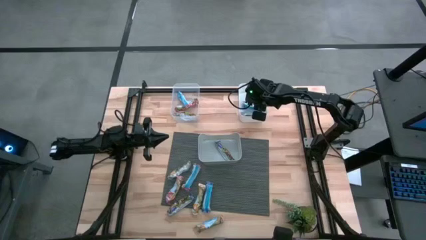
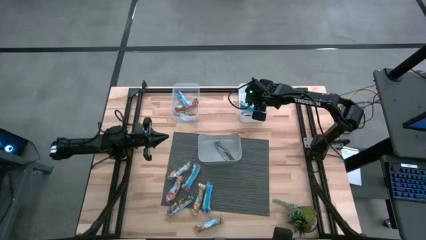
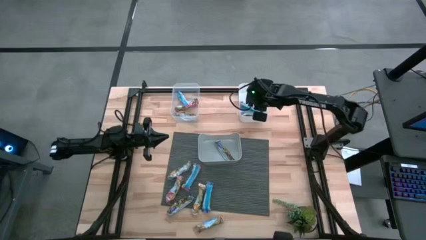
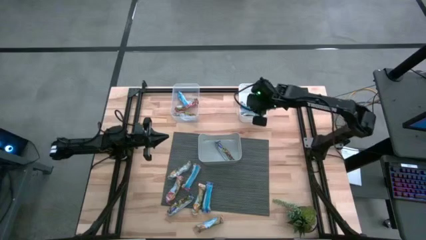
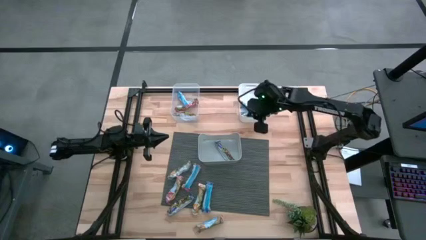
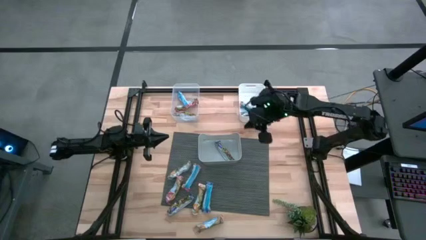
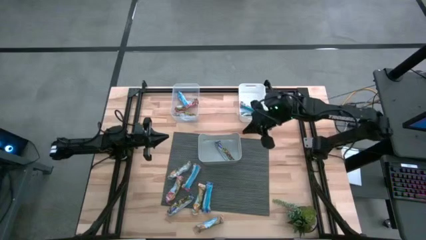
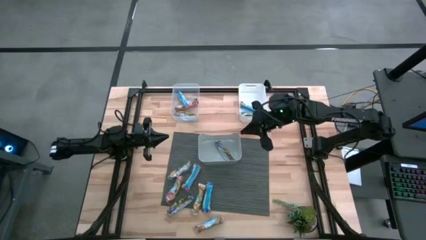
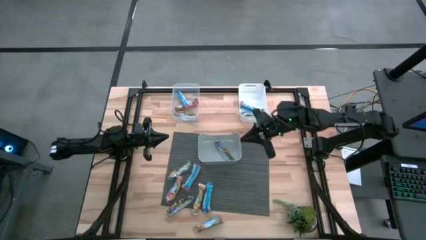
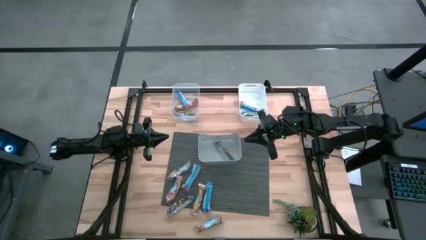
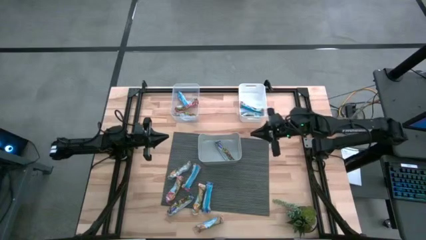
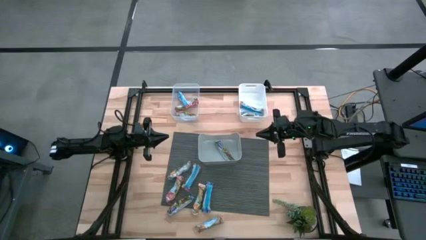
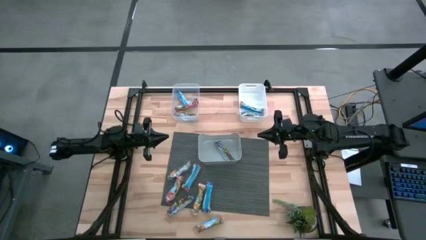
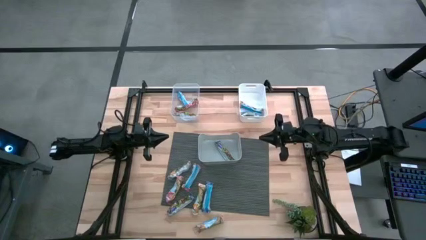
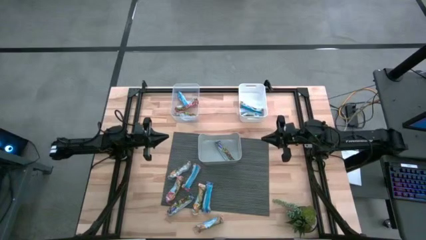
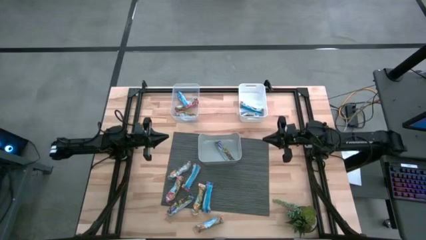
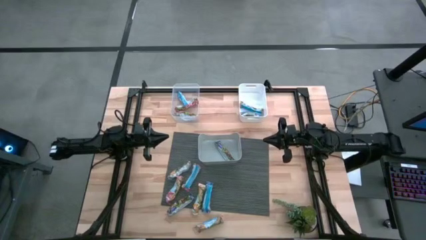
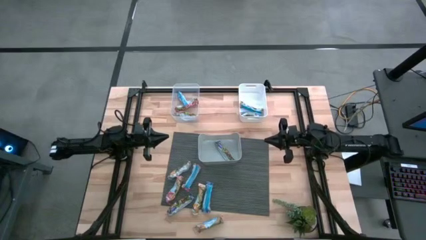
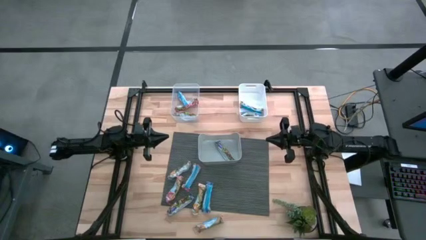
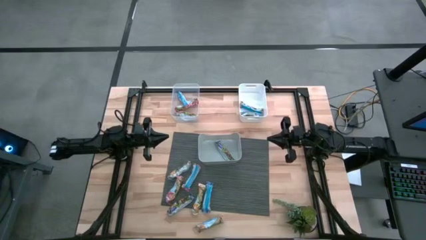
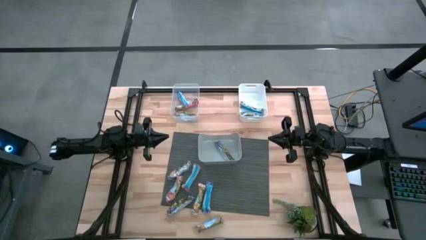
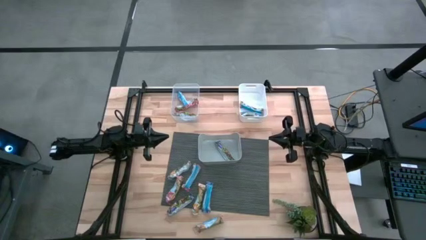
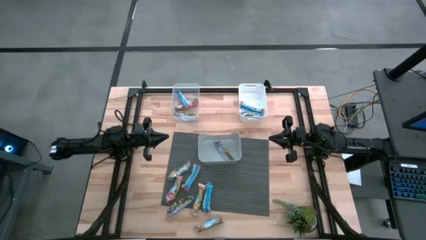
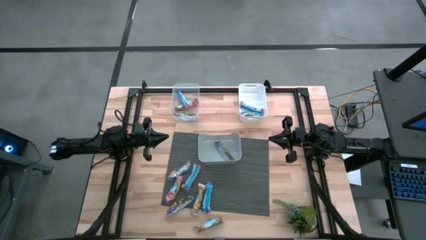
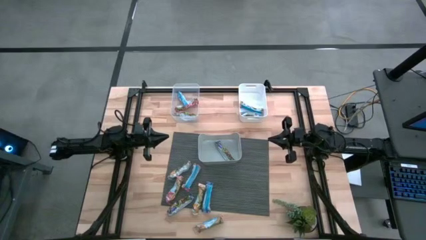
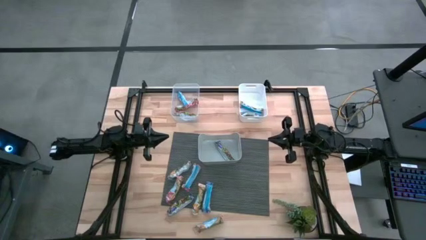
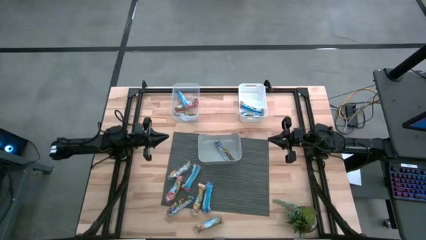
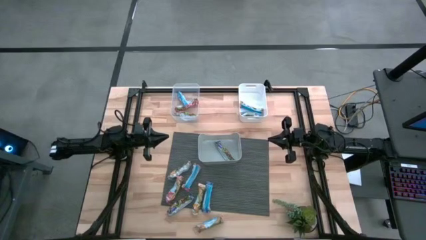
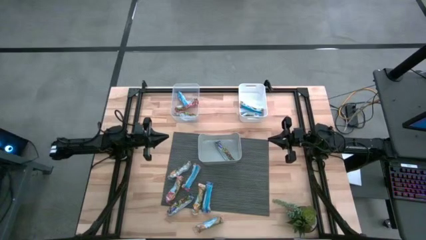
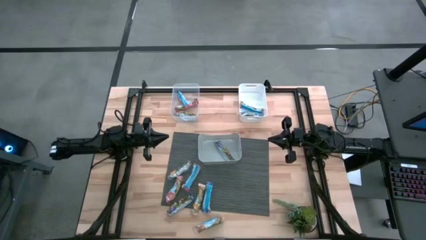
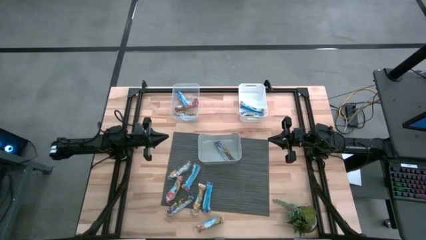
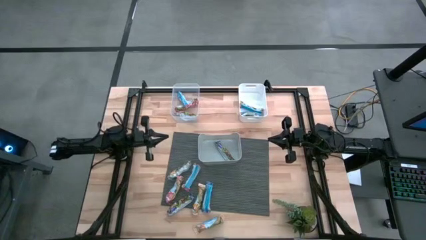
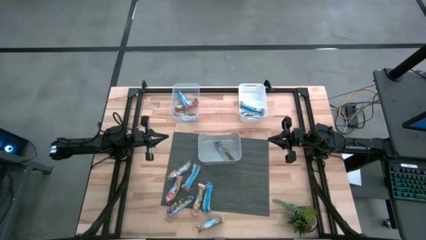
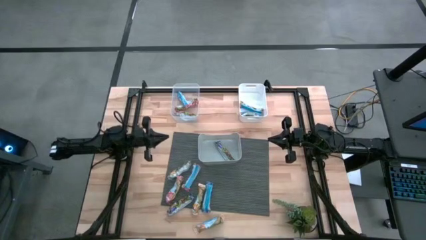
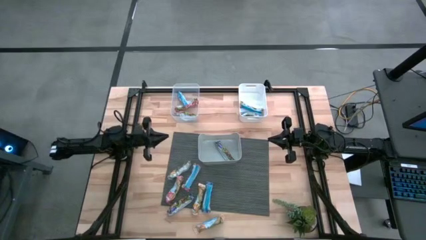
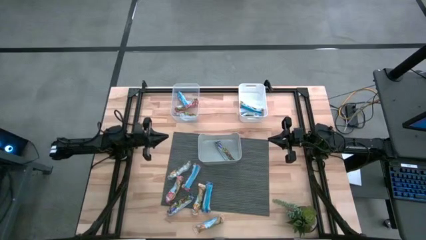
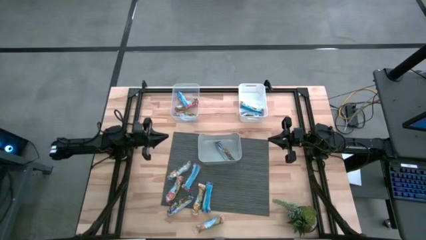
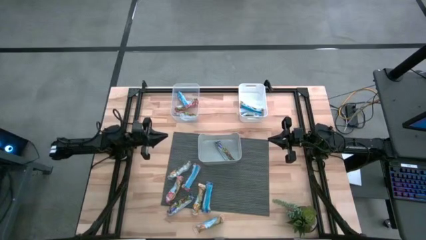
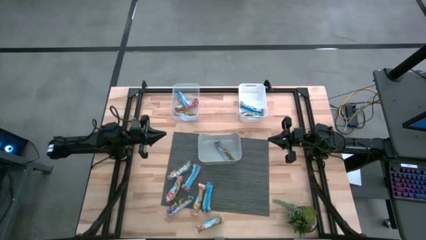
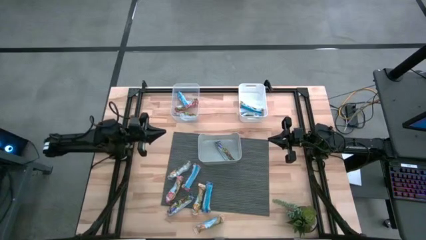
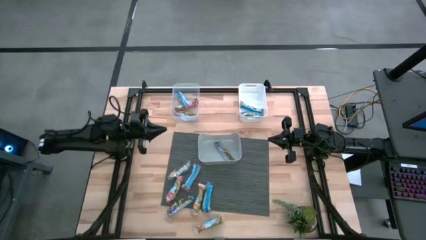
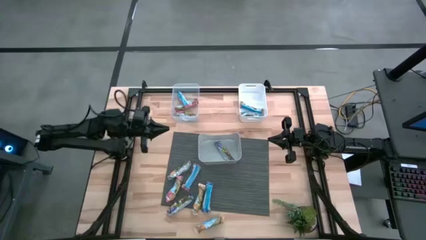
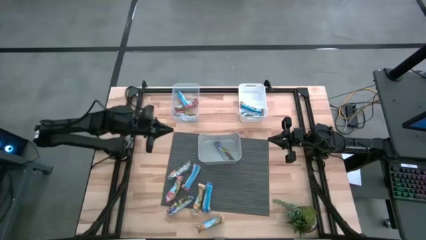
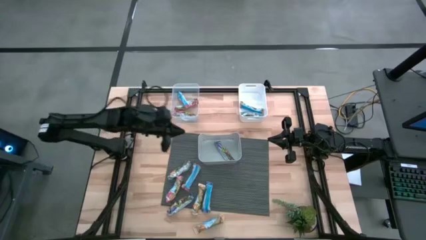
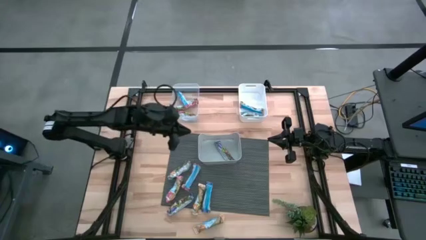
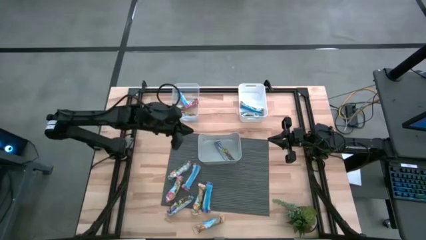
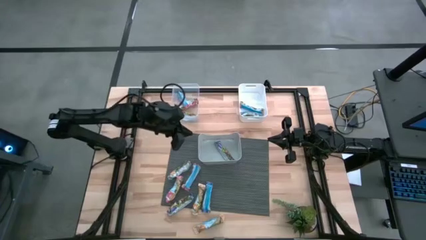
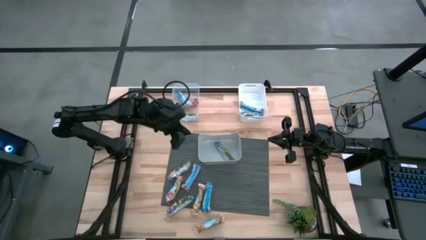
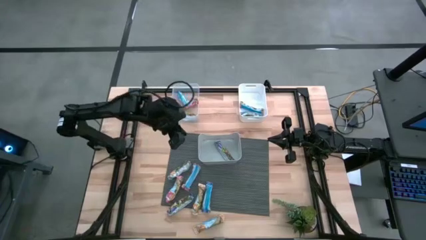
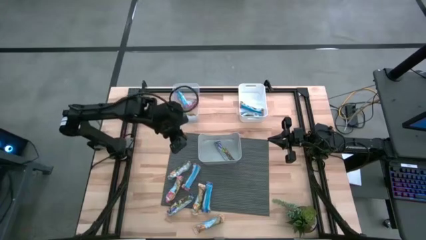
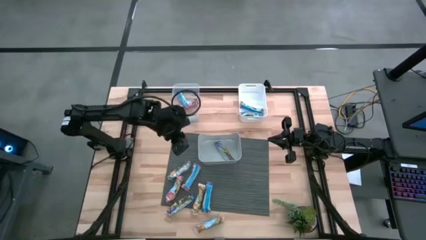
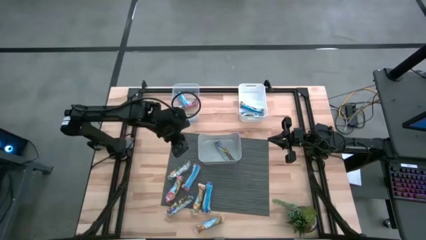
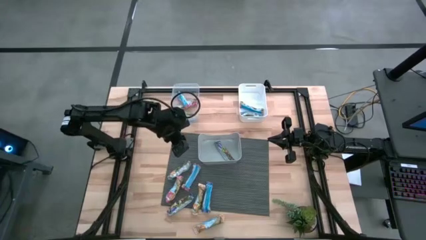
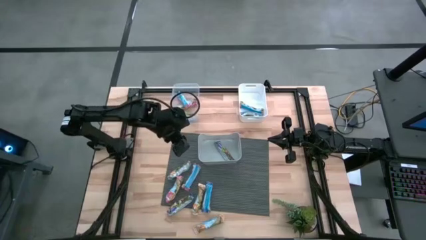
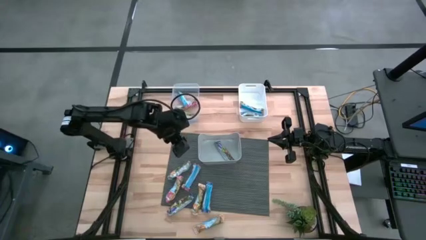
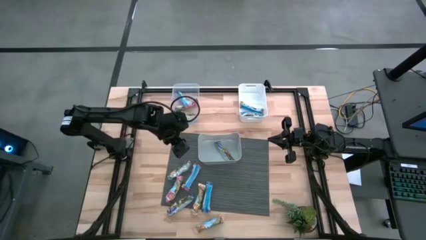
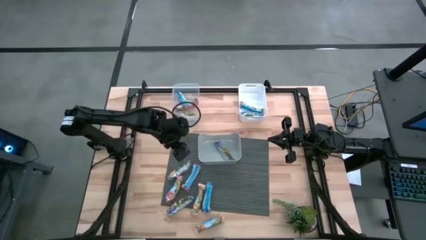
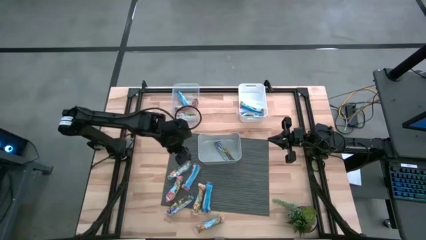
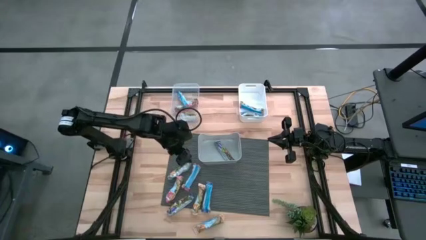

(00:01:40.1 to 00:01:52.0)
Task: Pick and place Granola Bars by type
Put the yellow granola bar into the white bin

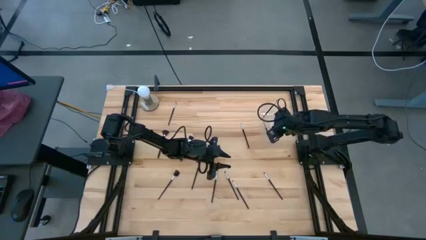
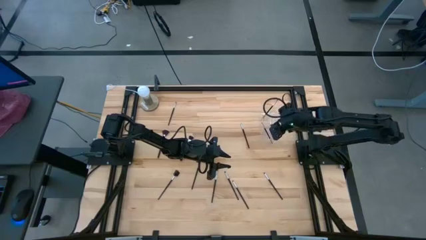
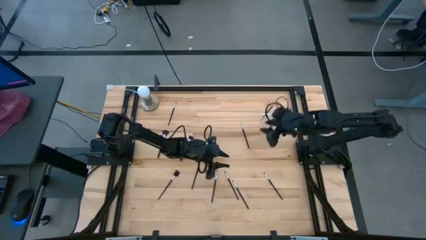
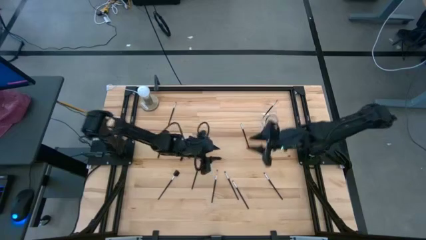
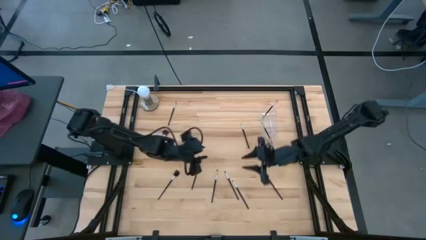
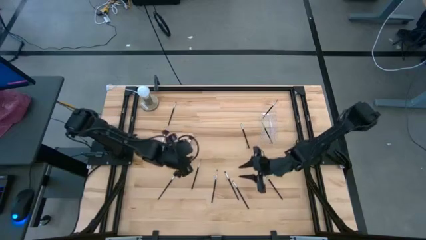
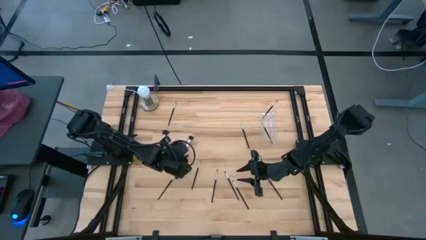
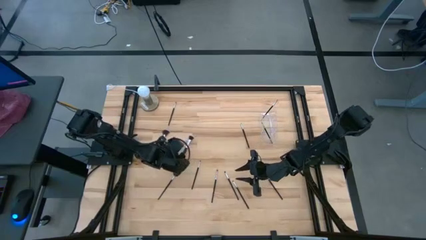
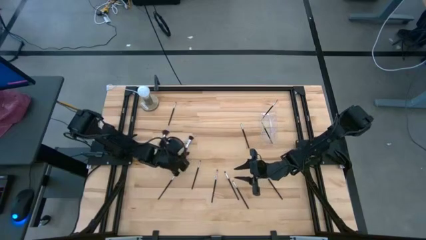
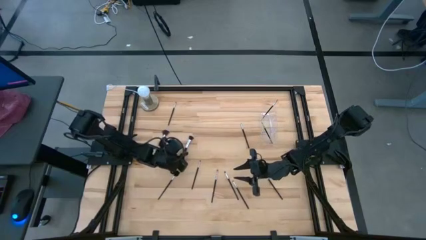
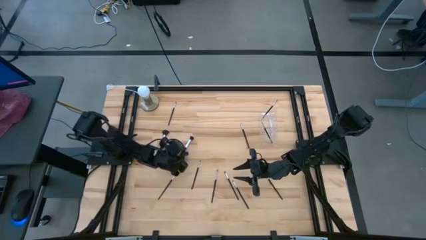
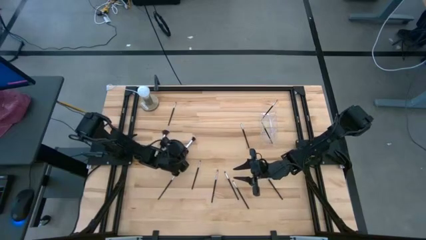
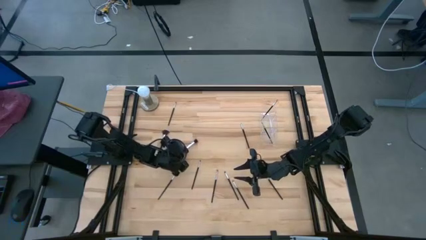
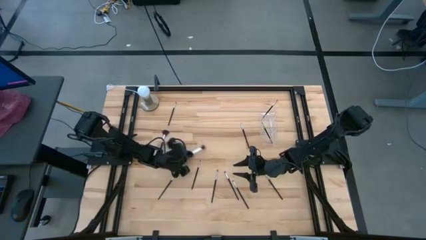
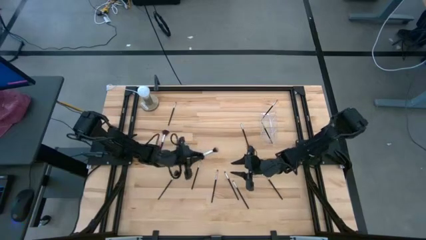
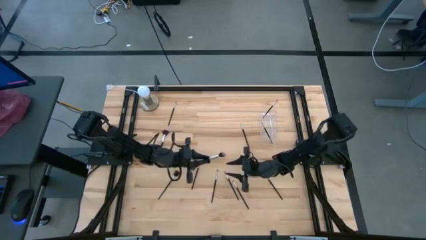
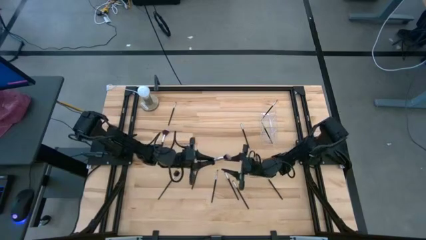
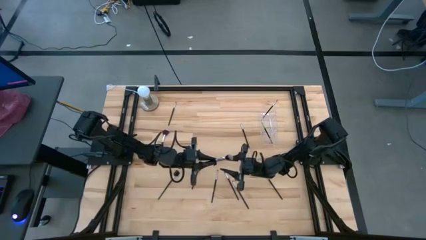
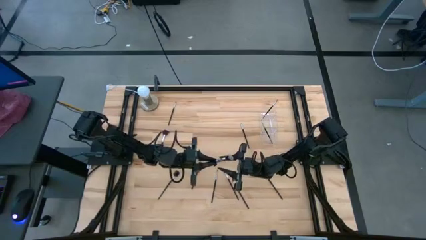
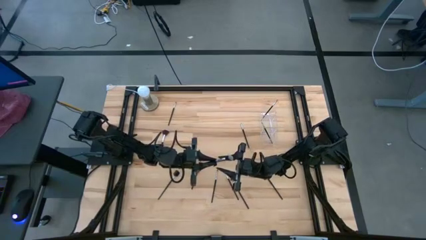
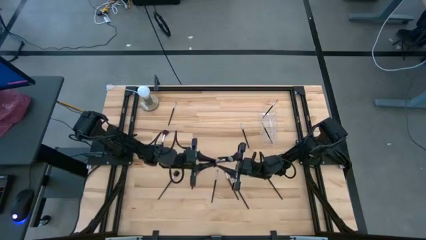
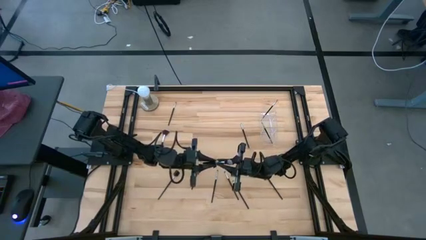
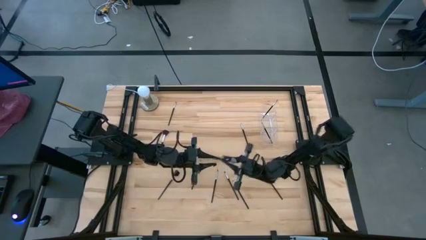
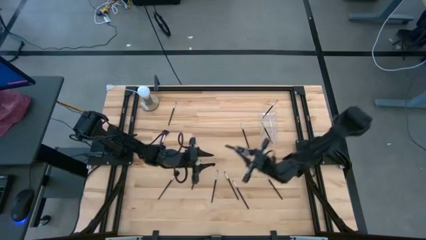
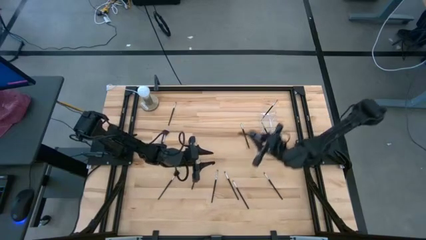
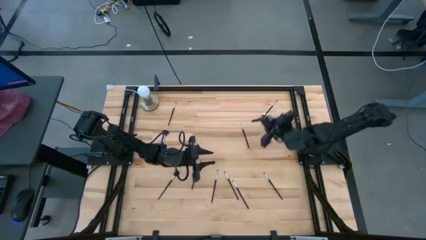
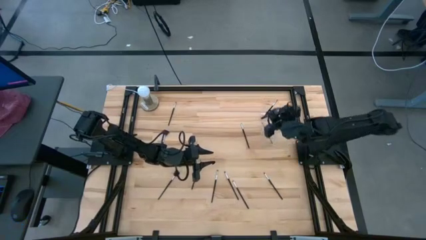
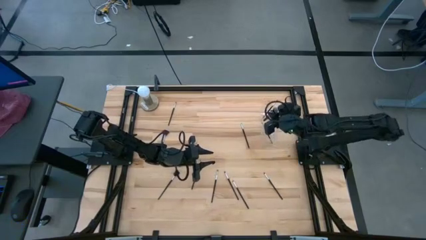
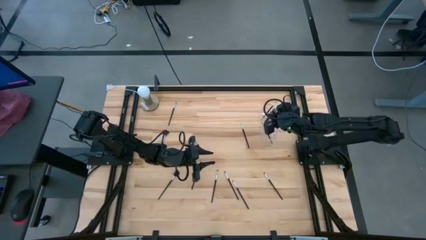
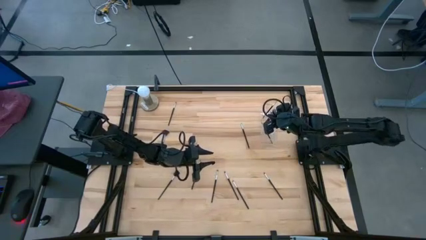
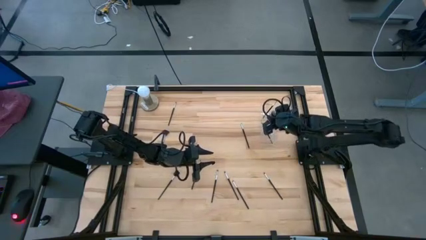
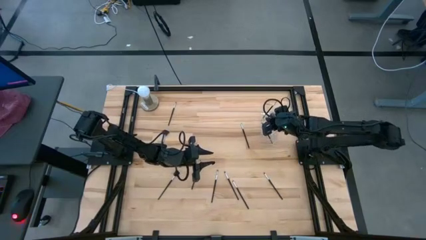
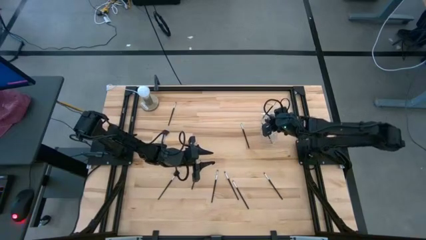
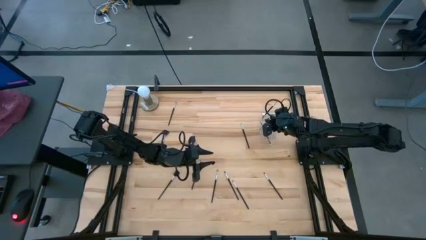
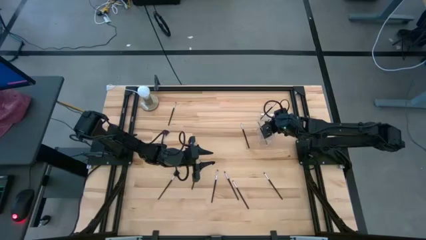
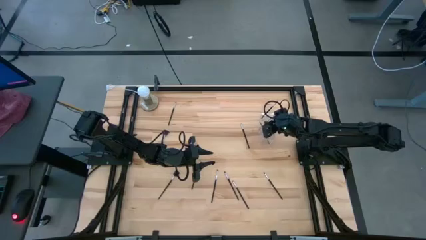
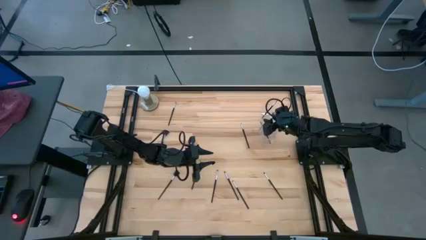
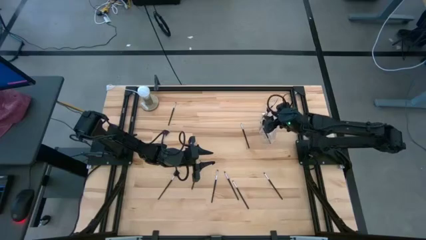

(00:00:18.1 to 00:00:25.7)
Task: Sort items
Put the silver powder brush into the transparent organizer
